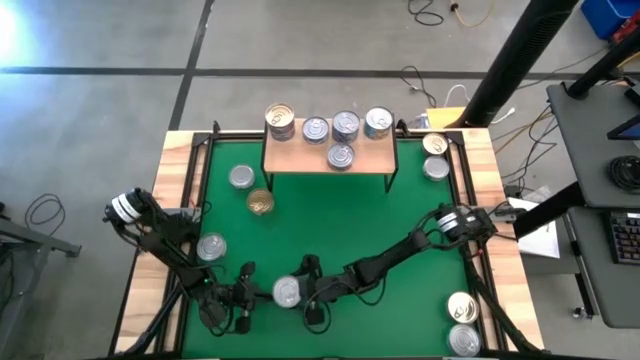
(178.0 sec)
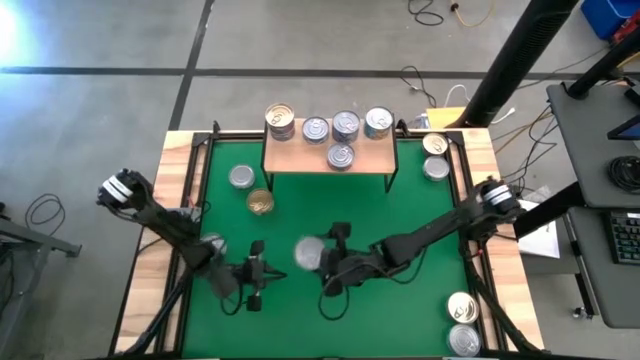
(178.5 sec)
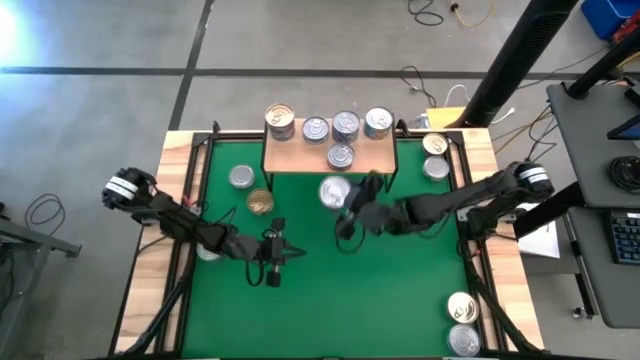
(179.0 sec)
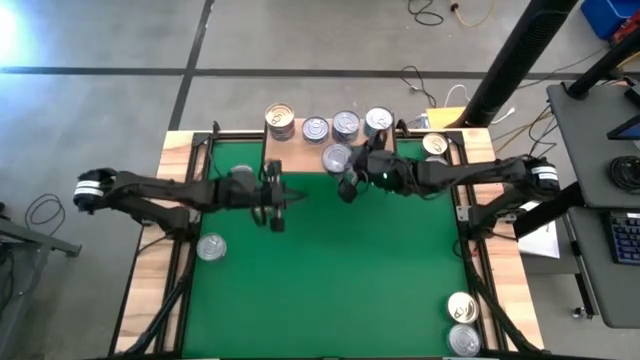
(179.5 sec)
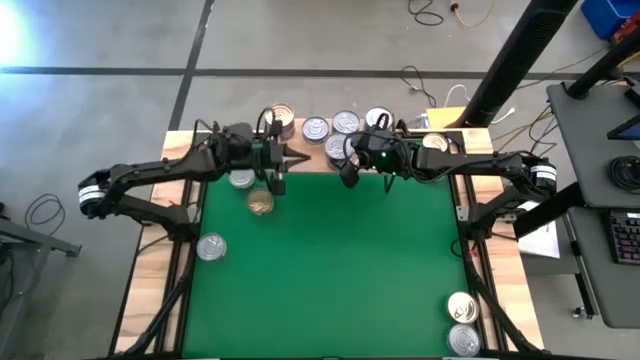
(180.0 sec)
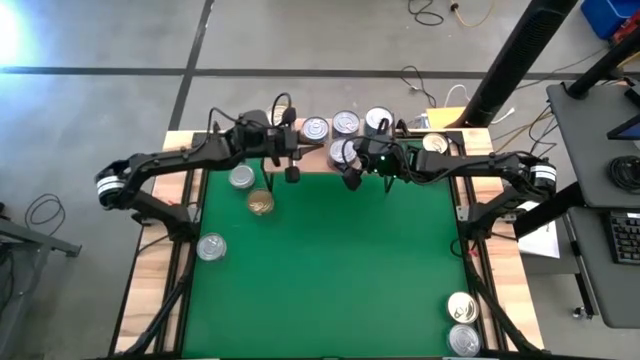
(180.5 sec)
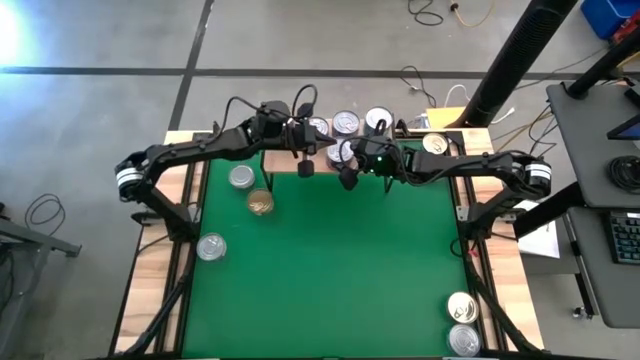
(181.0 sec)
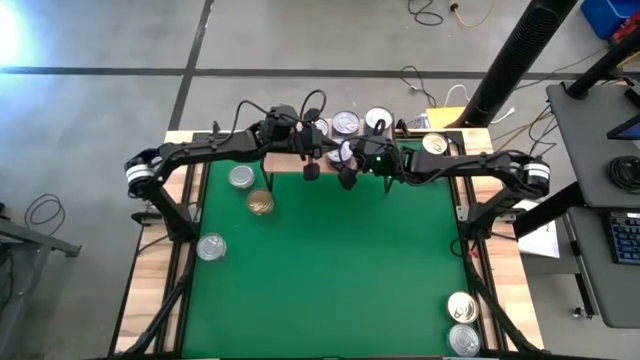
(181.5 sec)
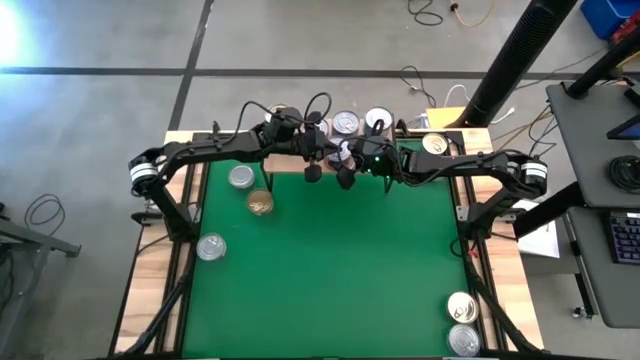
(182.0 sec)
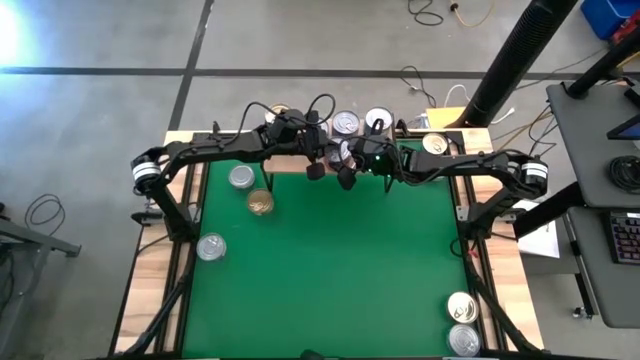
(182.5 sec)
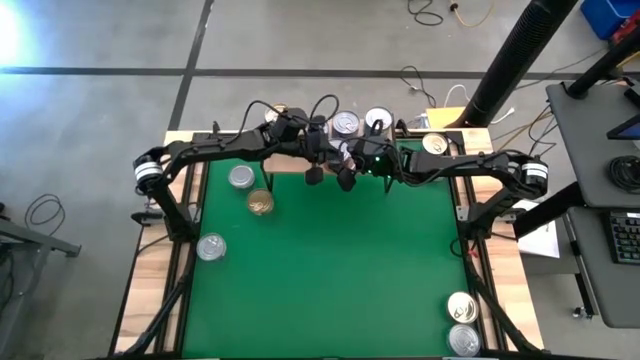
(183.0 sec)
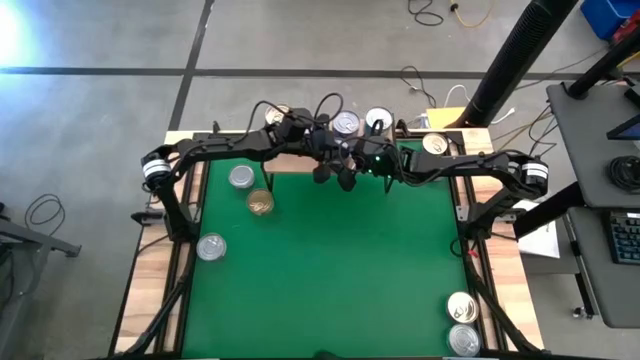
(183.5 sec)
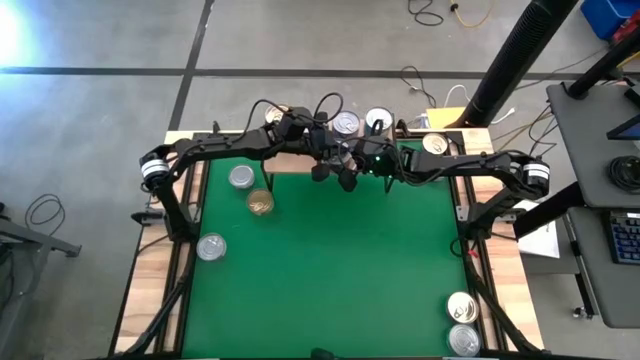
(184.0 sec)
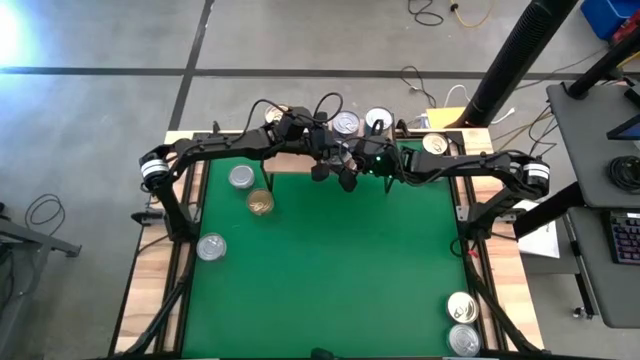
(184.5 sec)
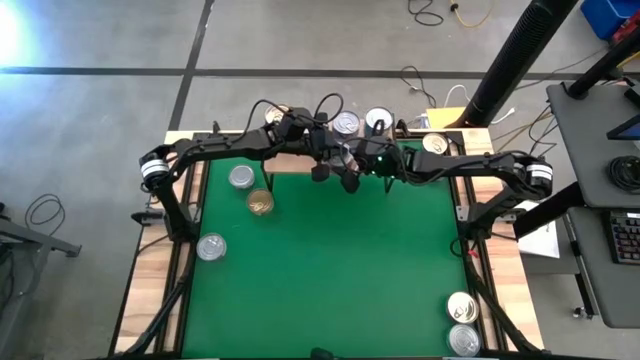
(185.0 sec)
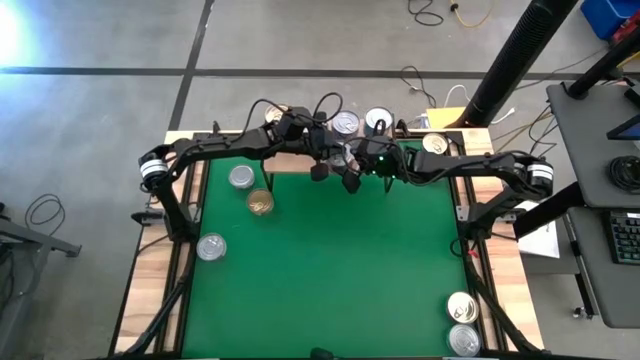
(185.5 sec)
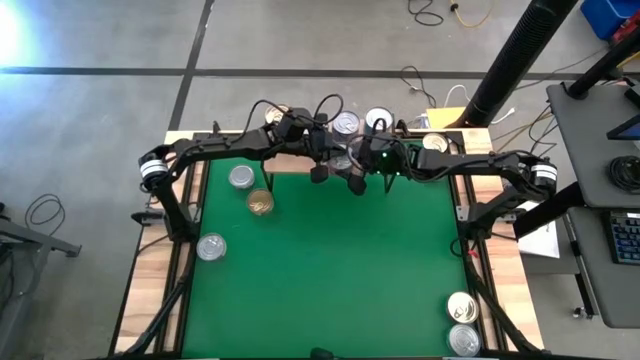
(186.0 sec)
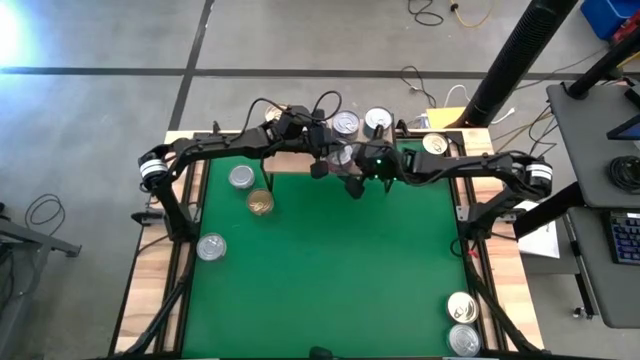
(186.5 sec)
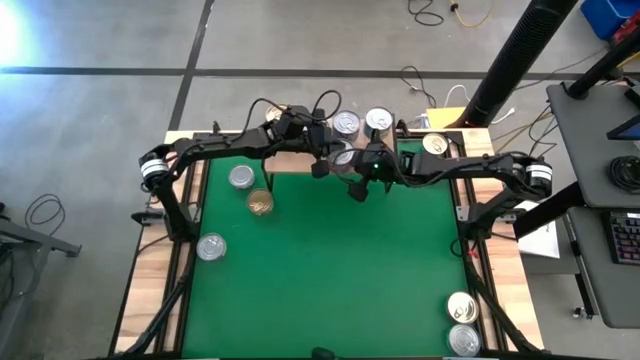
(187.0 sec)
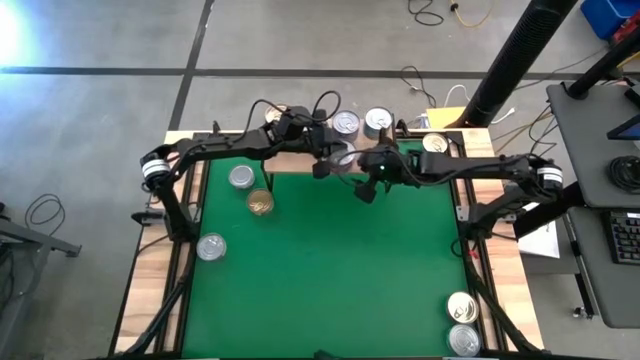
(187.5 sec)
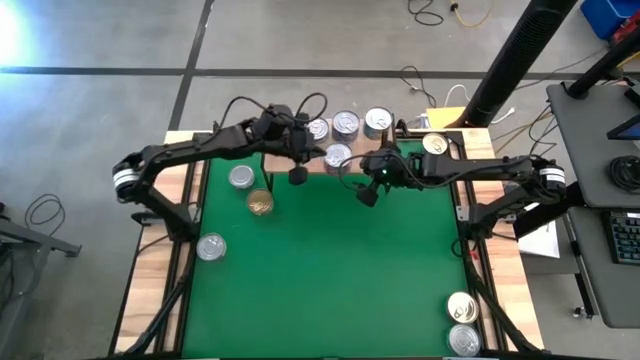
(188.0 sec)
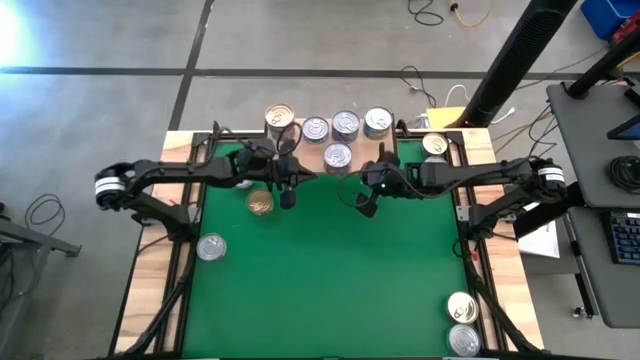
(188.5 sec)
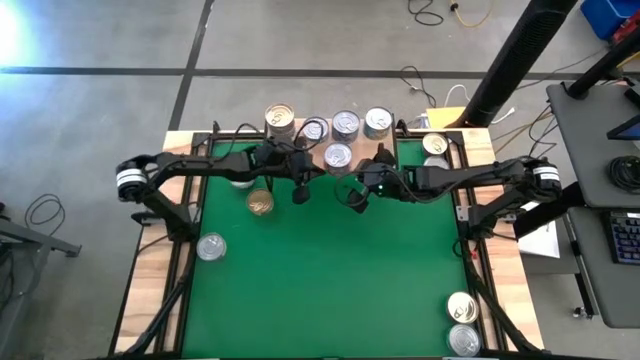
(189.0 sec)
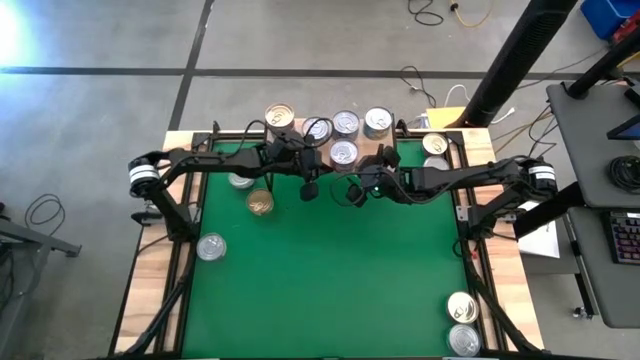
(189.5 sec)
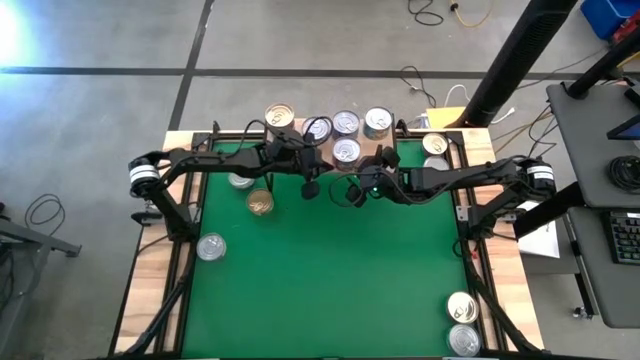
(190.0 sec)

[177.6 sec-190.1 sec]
Task: Stack canned seafood by type on shelf
Stack the red tuna can on top of the red tuna can on the shelf

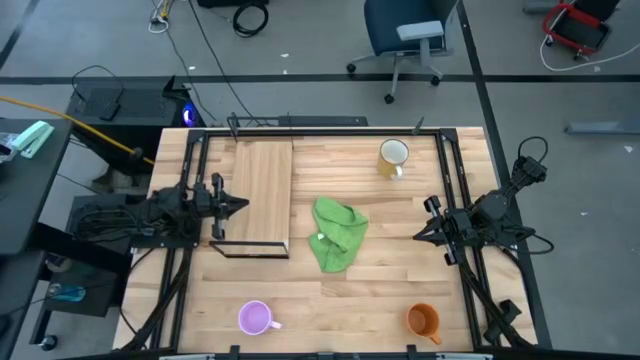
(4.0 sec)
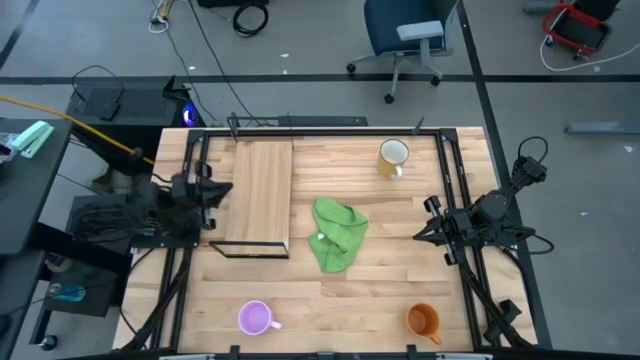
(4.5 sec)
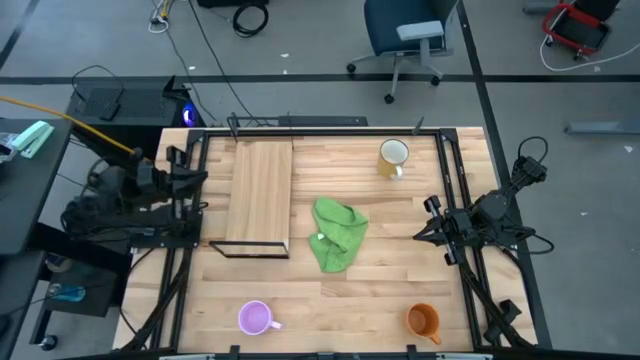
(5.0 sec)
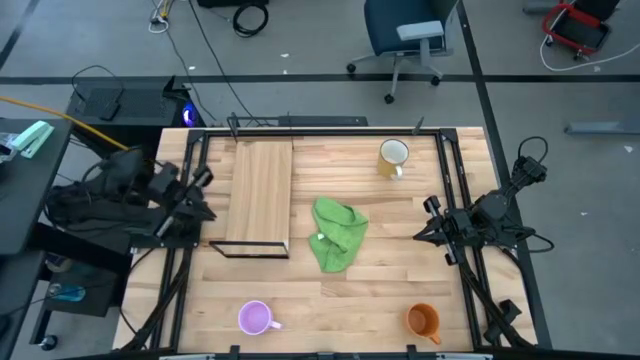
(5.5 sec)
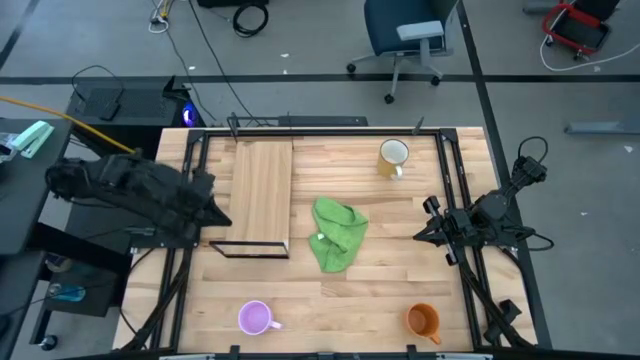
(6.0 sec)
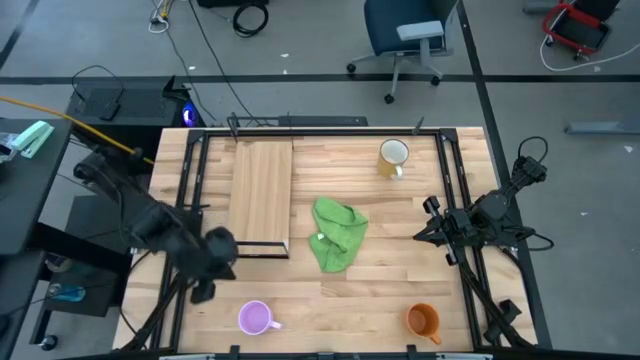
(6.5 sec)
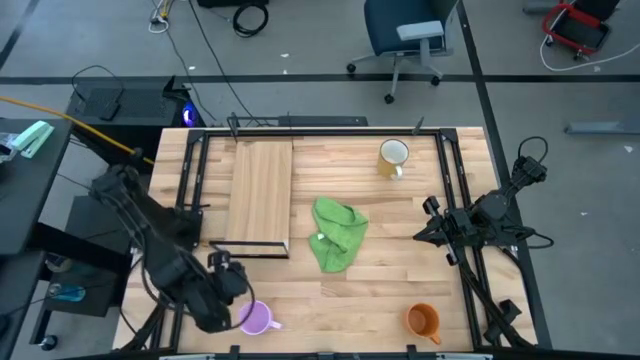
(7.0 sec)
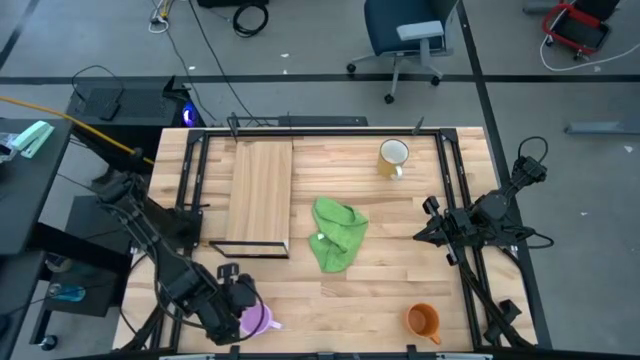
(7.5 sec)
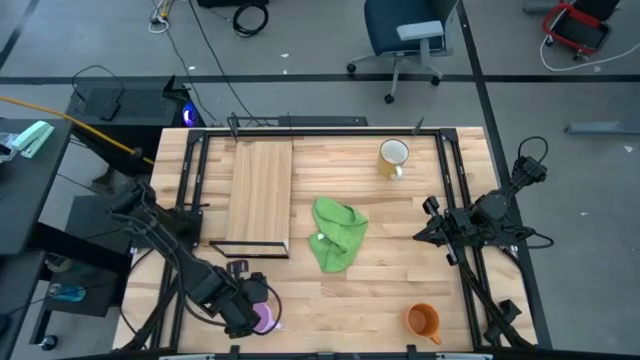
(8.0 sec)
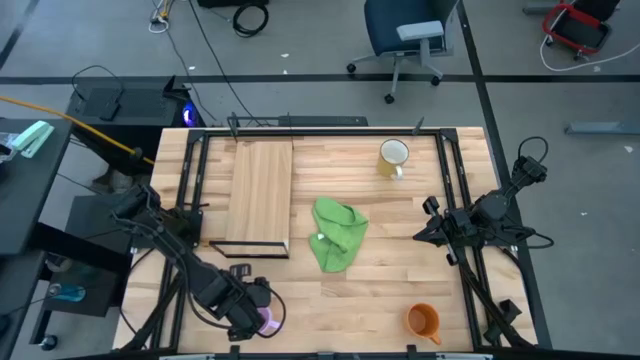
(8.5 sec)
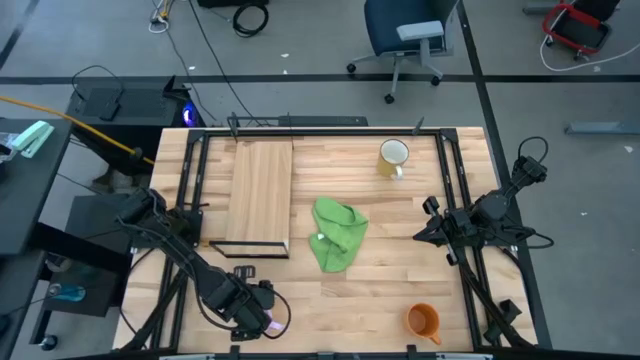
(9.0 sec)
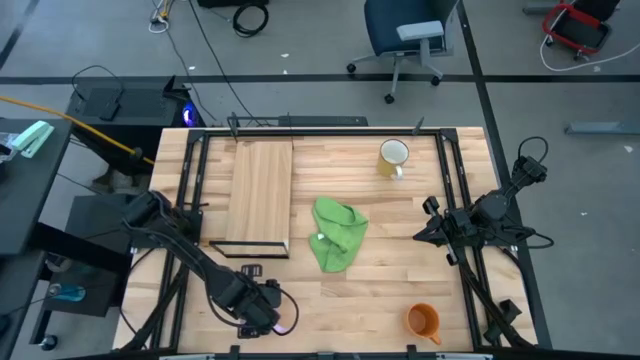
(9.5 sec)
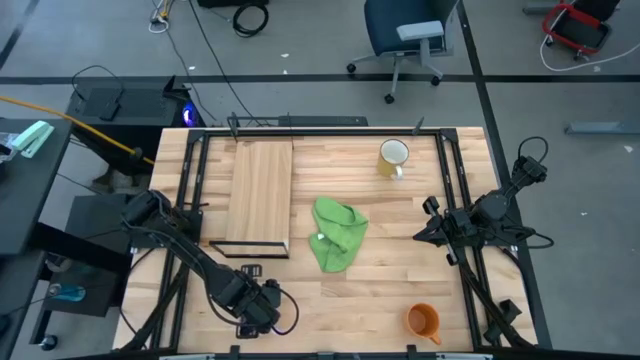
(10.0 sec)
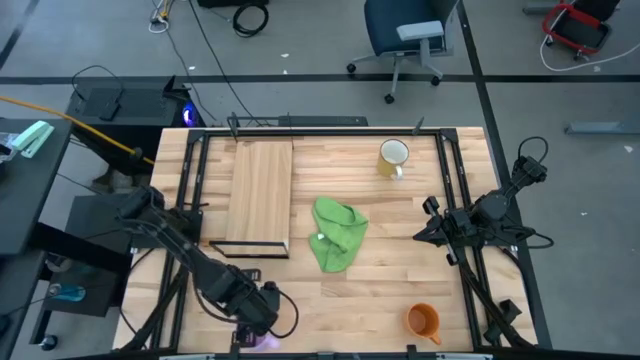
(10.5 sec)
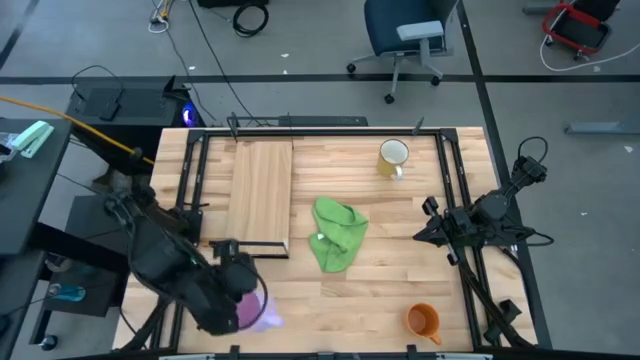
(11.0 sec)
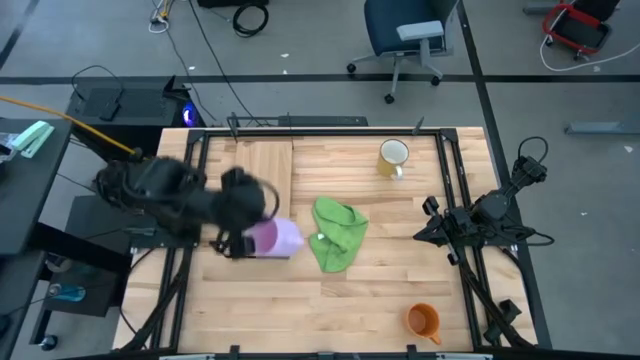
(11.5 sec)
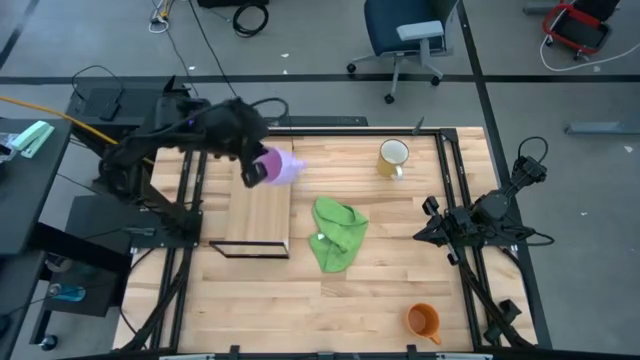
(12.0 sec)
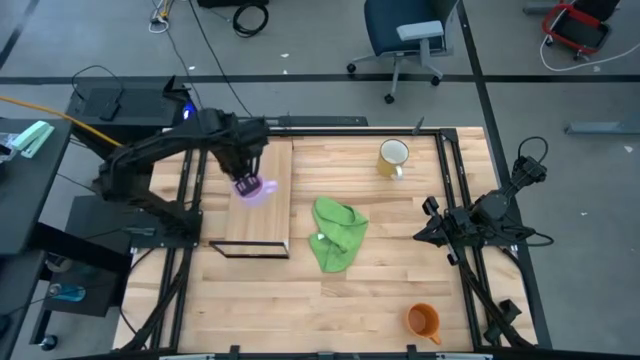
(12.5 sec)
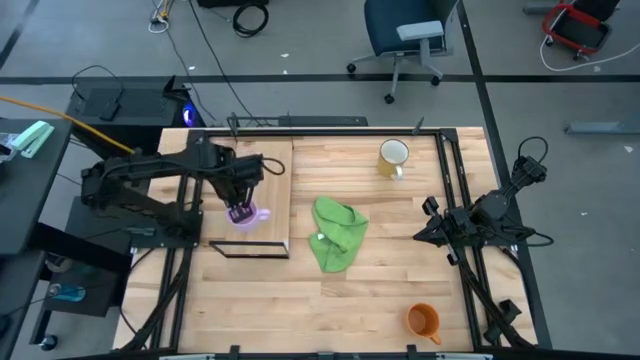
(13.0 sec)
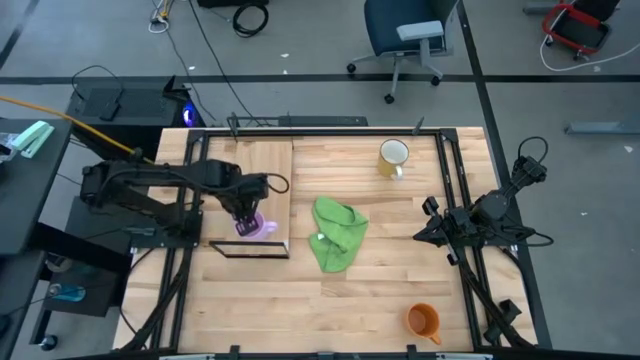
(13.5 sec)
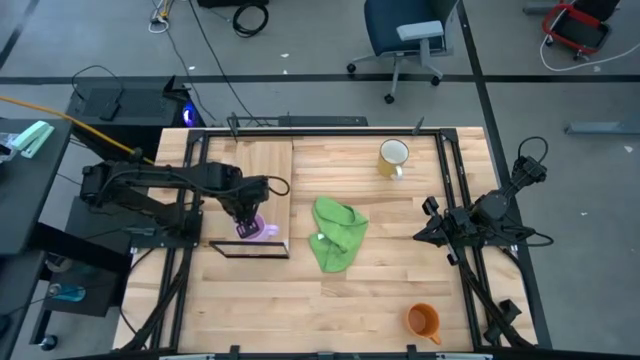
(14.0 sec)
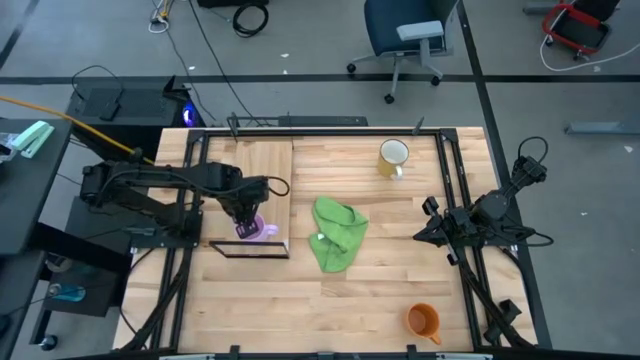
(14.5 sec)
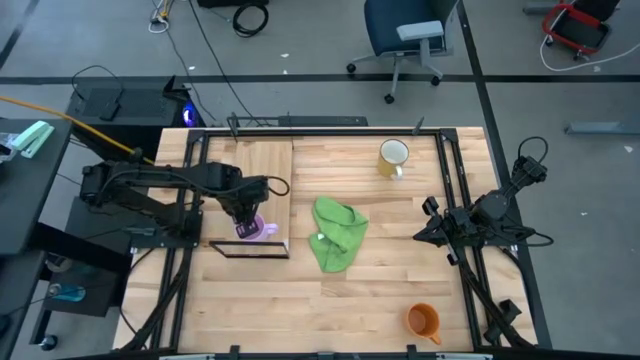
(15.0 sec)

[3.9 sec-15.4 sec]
Task: Stack small to large cups/mugs on shelf
Put the pink mug on the shelf
